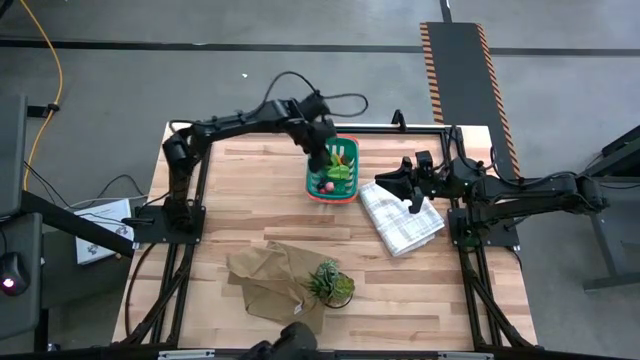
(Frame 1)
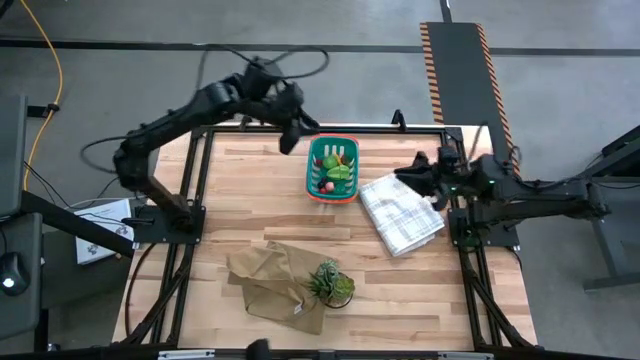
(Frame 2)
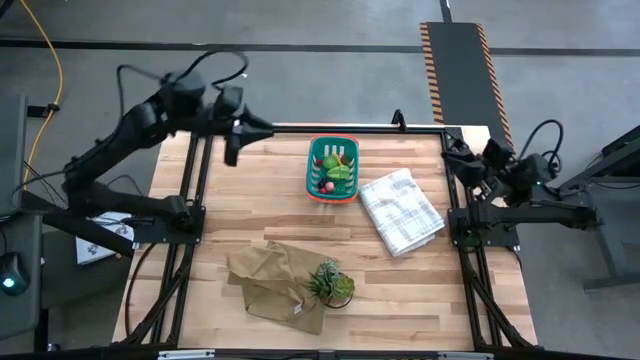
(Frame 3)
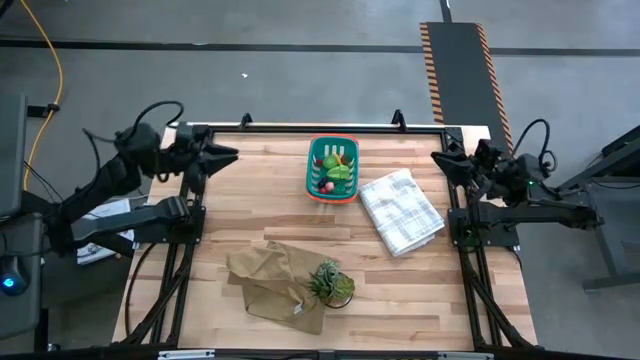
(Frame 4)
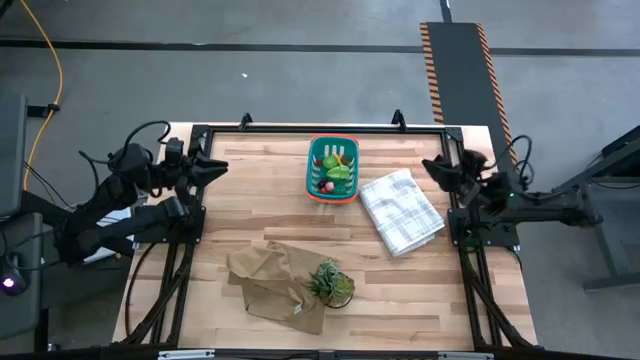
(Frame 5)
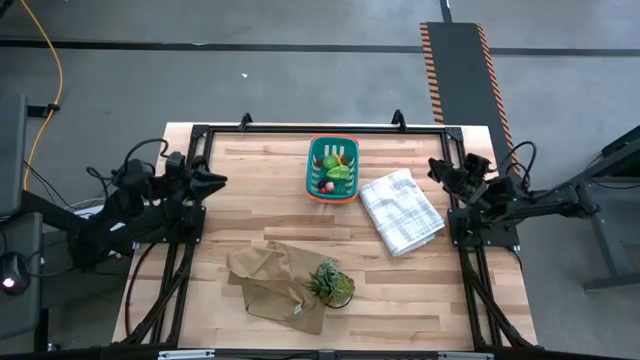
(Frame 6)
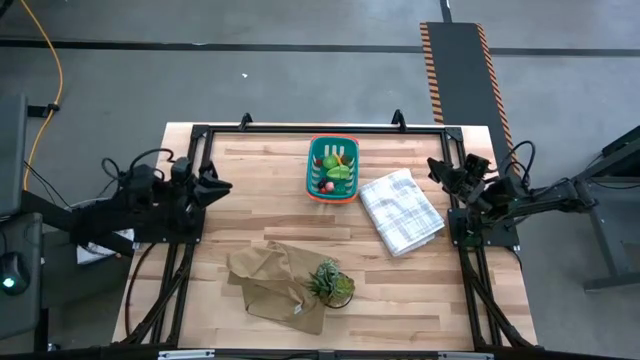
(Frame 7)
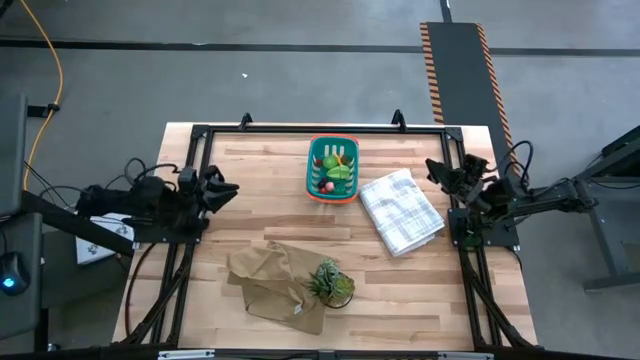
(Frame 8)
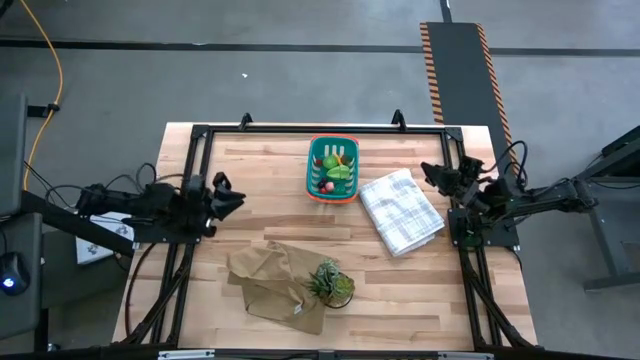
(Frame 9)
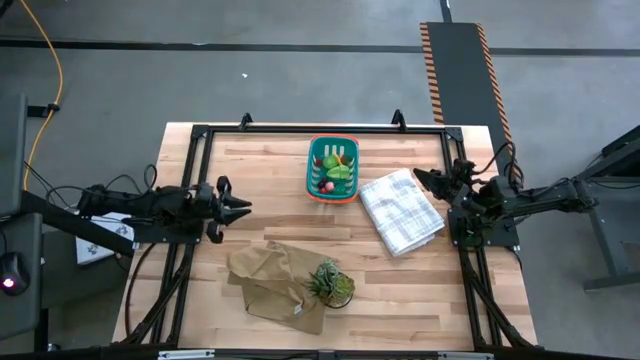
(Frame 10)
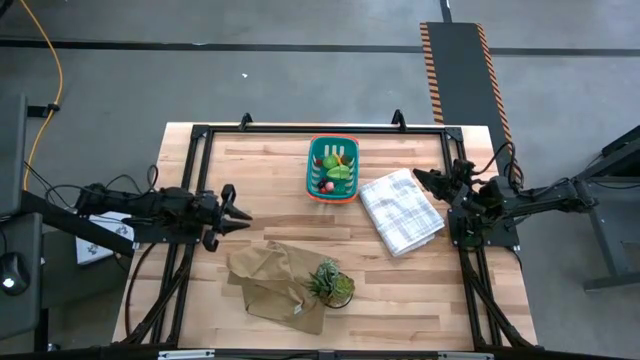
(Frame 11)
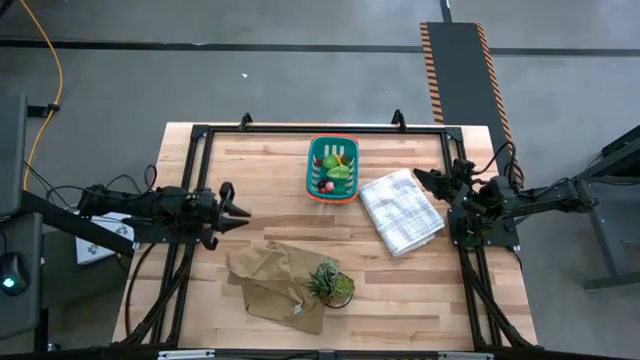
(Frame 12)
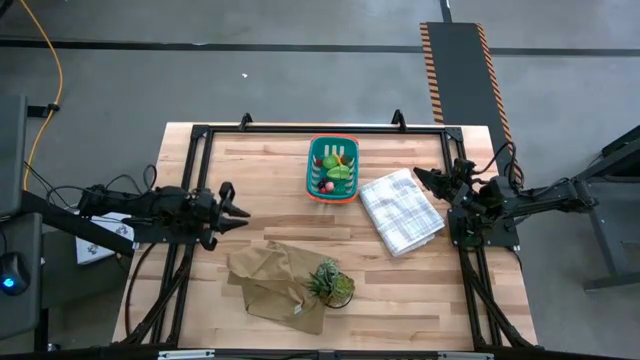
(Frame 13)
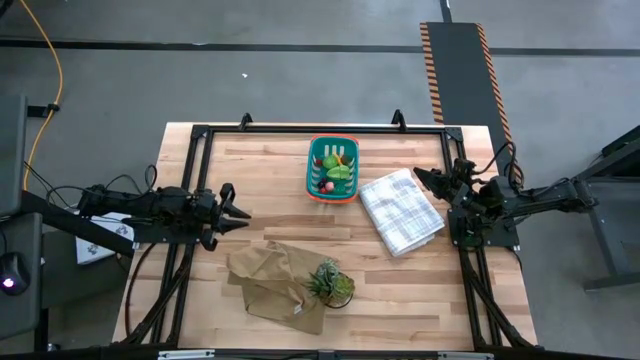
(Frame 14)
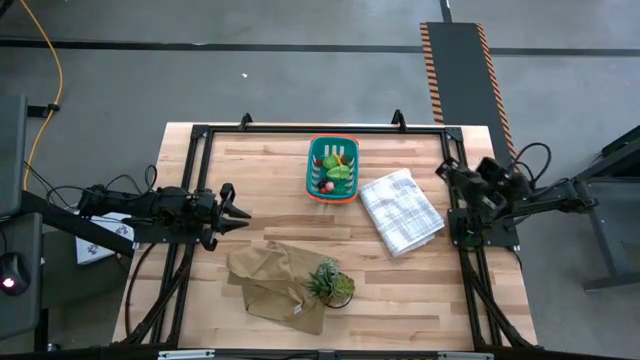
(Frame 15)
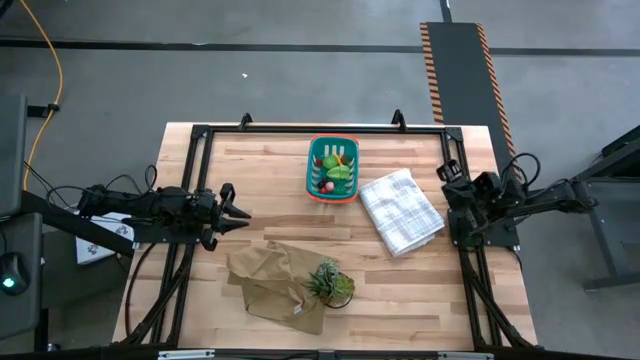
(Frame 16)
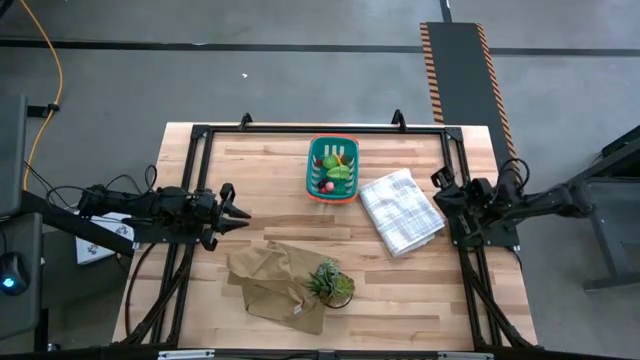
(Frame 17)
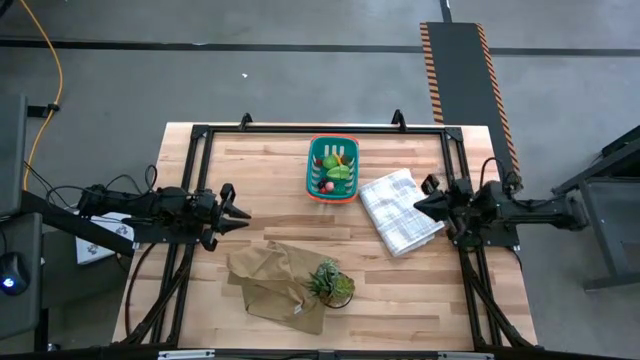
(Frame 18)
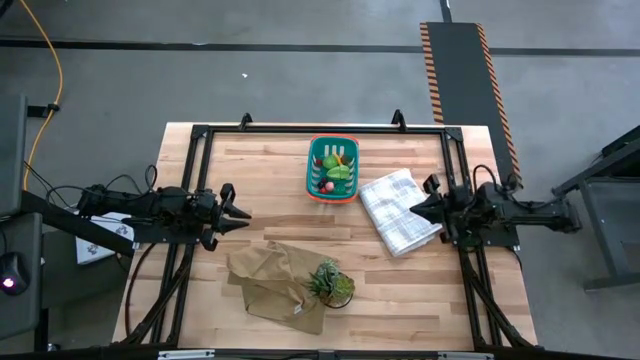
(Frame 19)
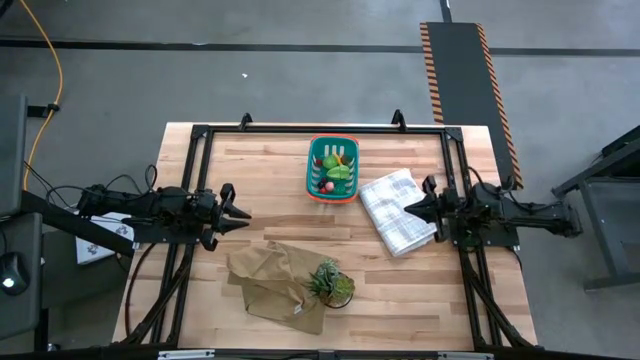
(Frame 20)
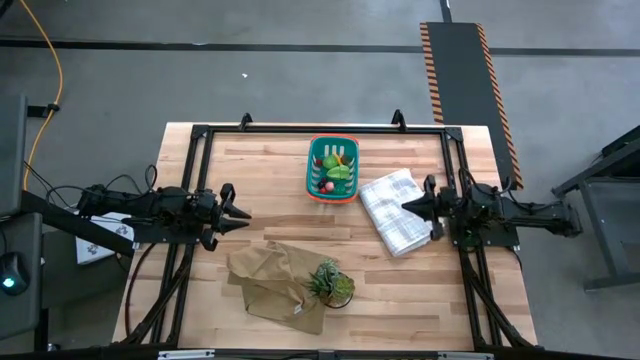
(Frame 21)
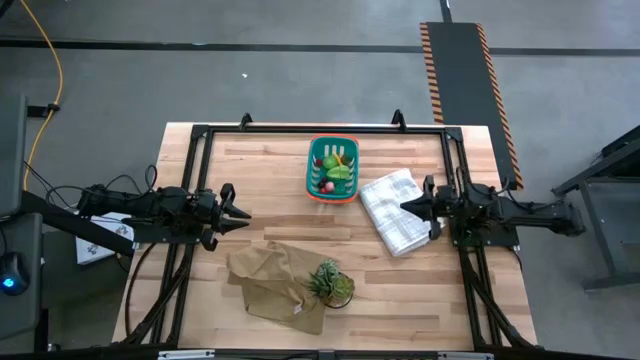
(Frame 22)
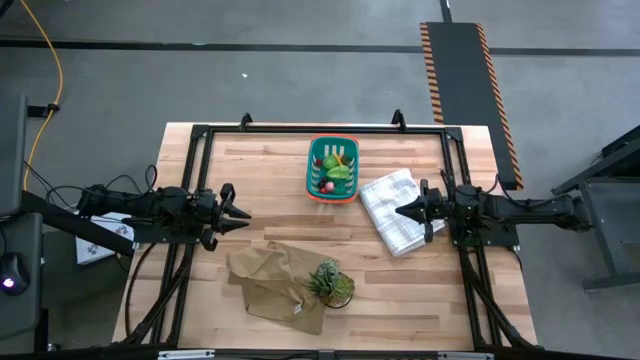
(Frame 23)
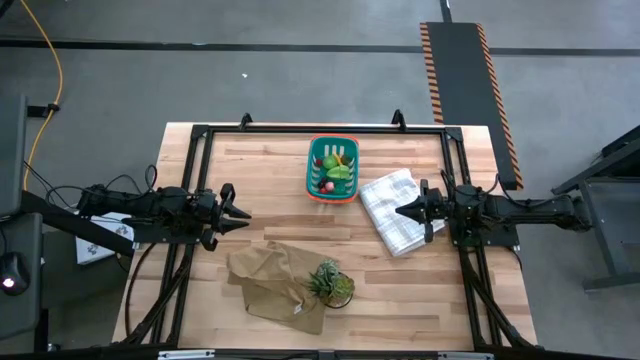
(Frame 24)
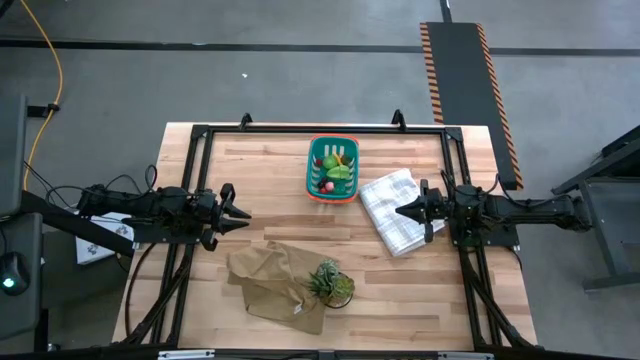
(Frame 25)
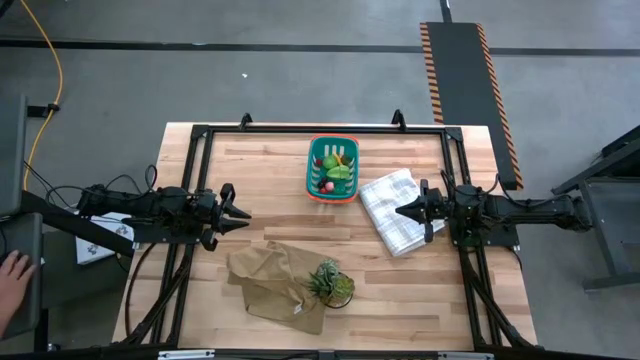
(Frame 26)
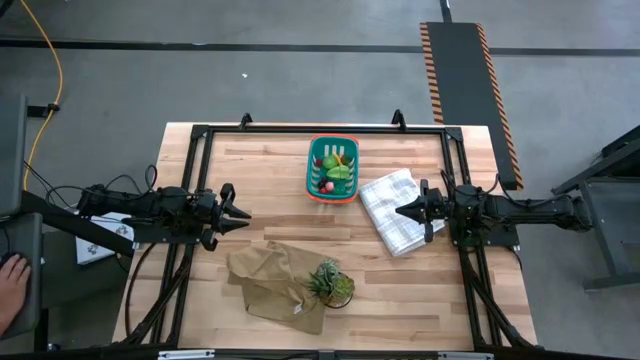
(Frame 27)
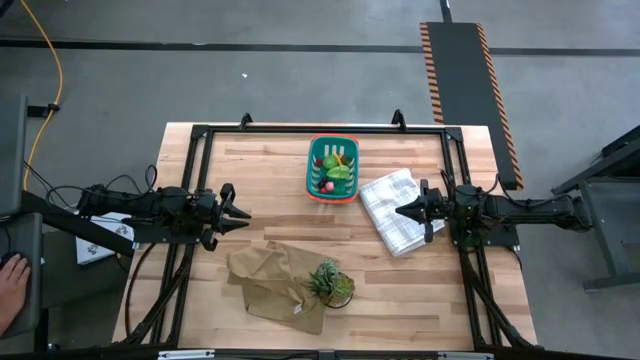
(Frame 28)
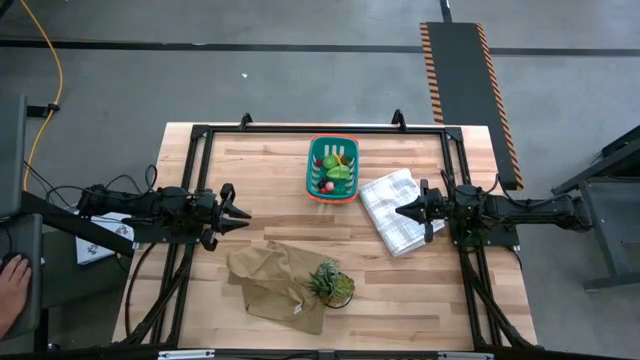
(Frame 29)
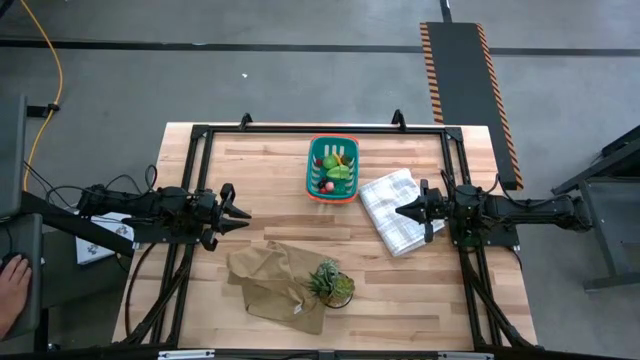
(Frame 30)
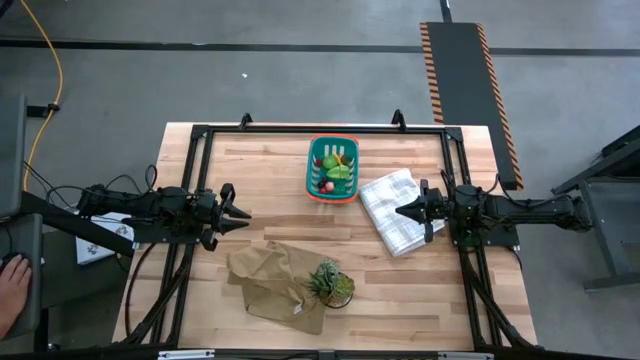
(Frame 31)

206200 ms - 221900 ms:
Task: Pick and placing Produce into tupperware
Return to Home Position

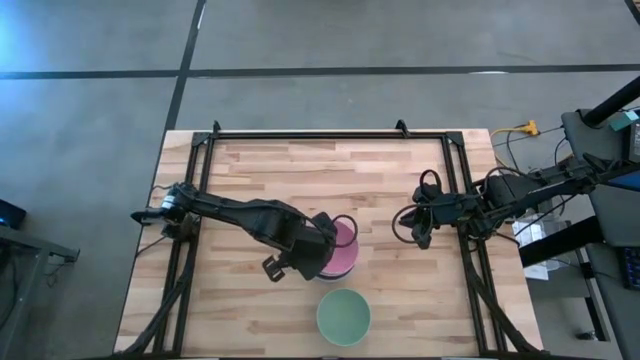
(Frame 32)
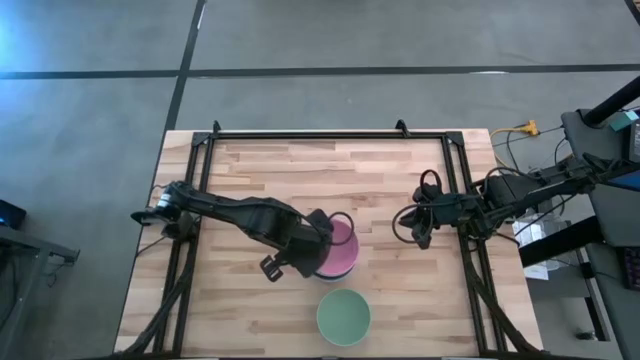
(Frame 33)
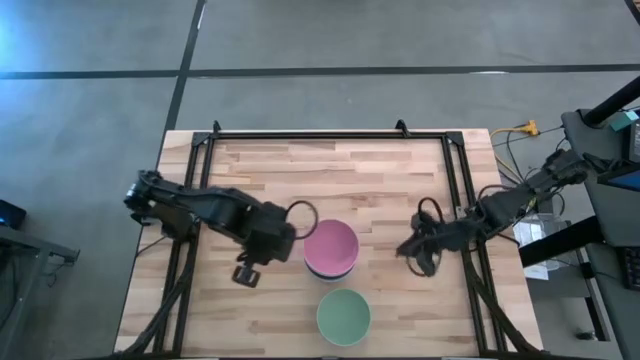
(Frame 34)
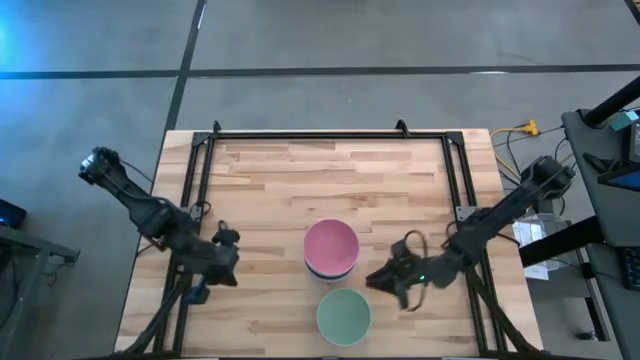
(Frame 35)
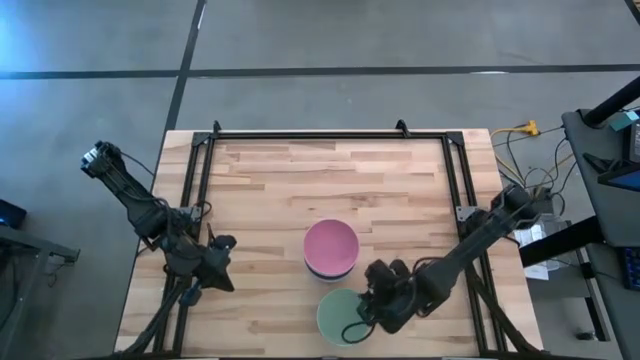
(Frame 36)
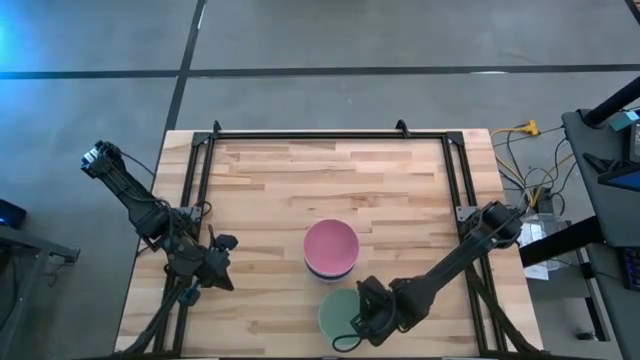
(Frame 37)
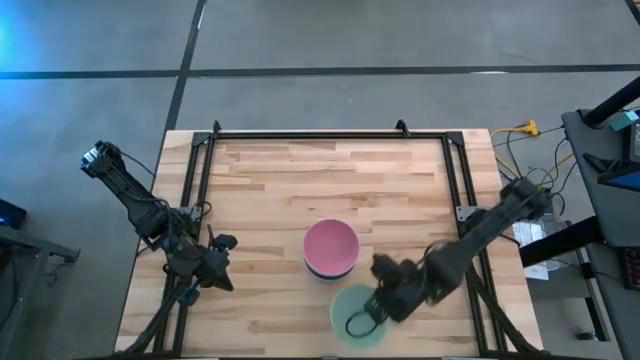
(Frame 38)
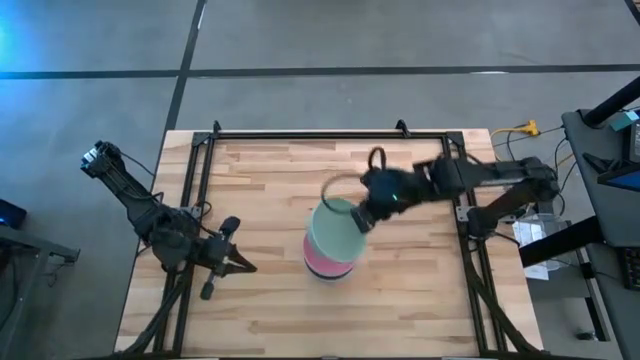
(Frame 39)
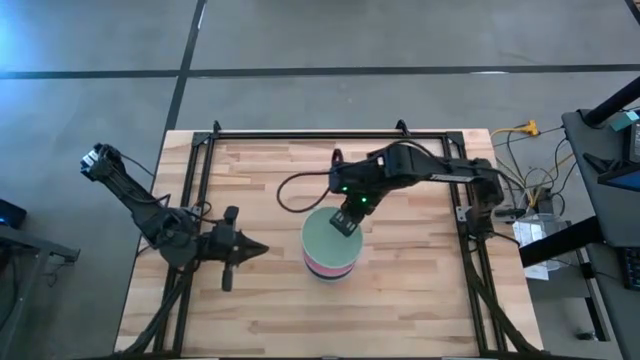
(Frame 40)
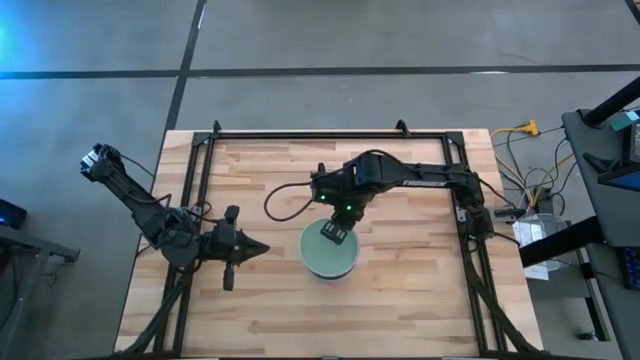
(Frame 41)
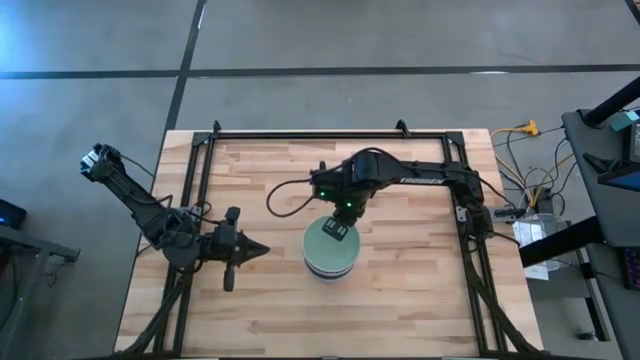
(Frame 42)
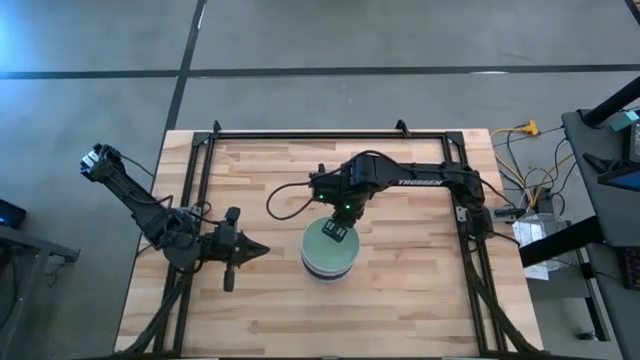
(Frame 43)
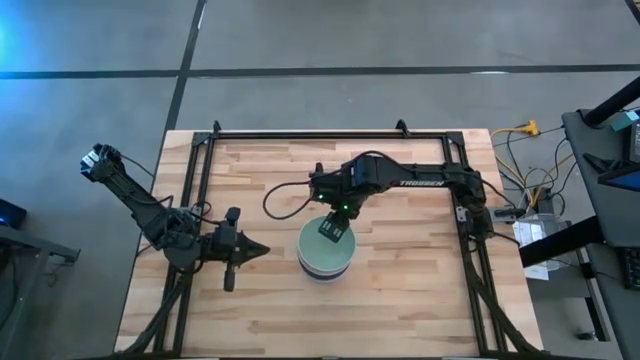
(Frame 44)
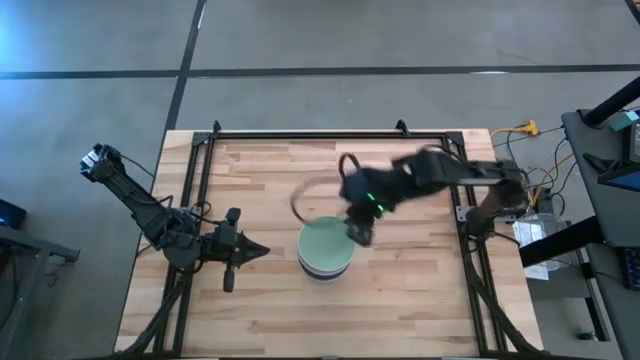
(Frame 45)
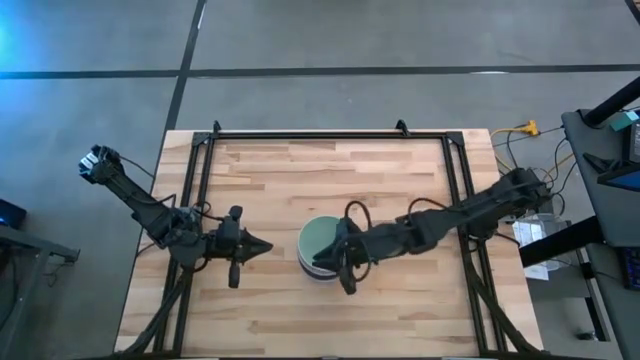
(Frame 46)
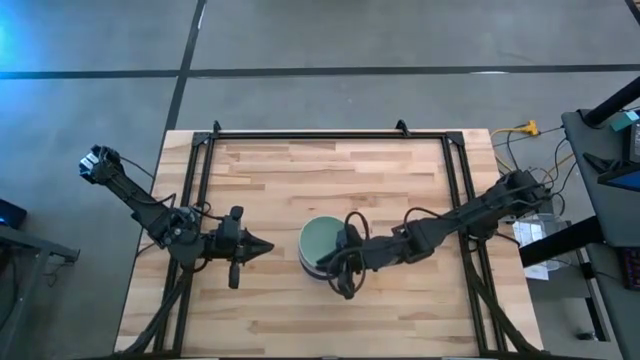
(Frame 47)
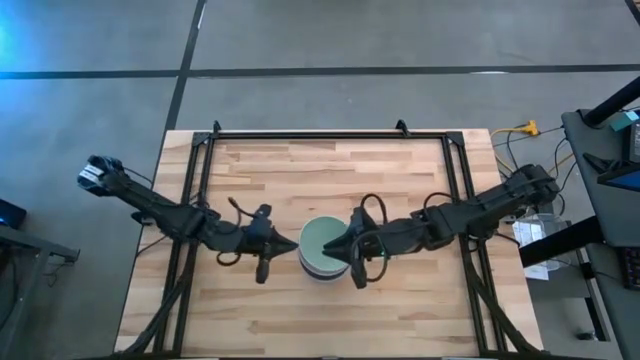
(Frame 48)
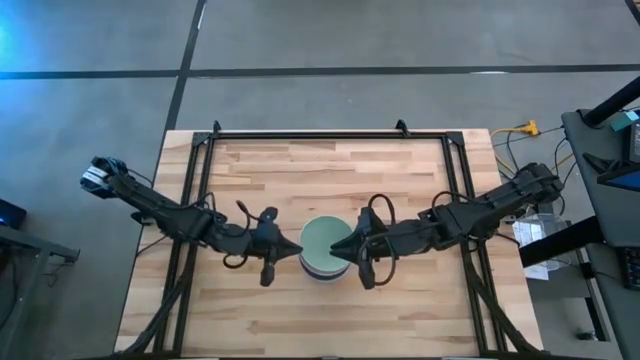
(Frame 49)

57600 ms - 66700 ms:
Task: Nest bowls inside each other
Stack the light blue bowl on top of the pink bowl
